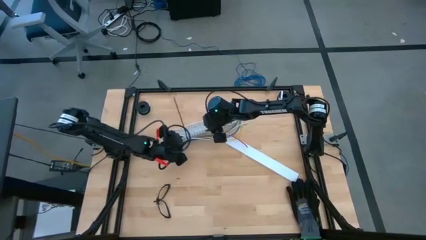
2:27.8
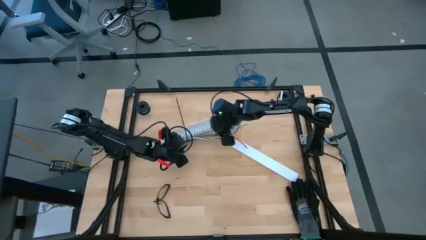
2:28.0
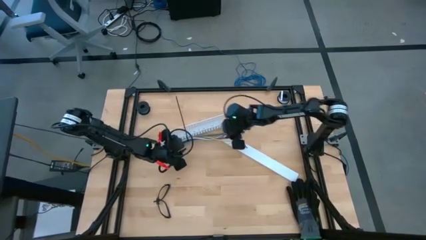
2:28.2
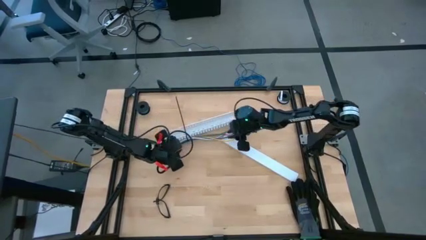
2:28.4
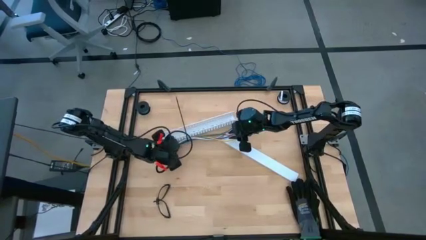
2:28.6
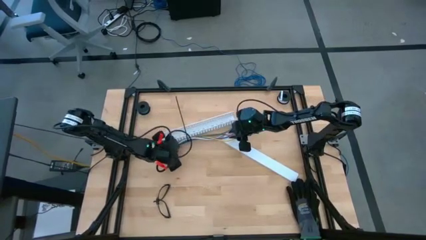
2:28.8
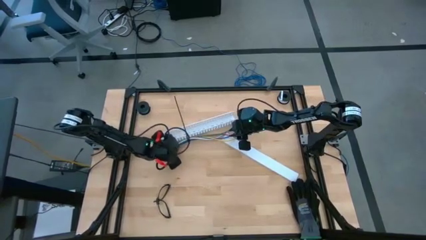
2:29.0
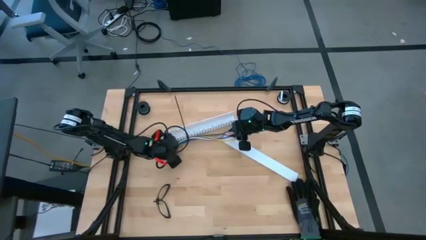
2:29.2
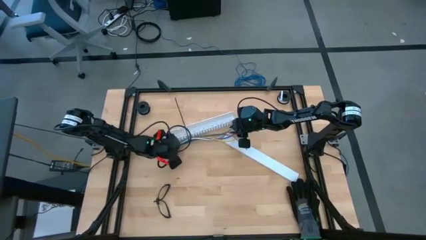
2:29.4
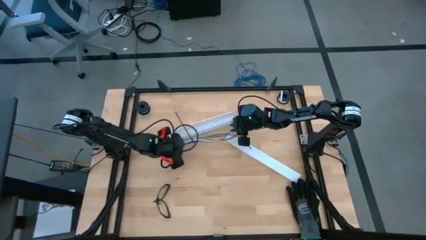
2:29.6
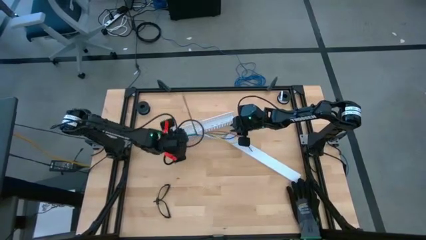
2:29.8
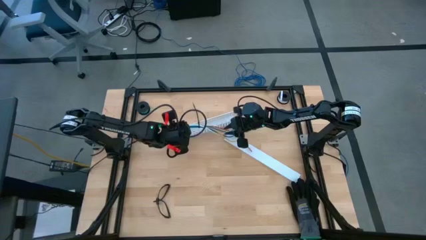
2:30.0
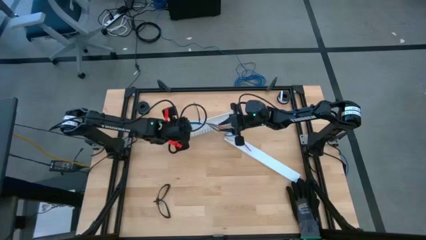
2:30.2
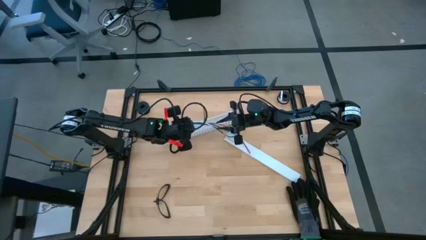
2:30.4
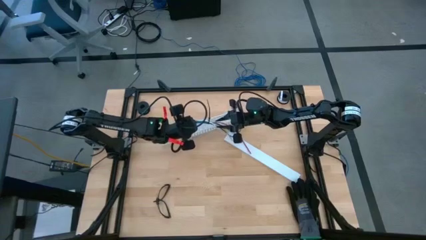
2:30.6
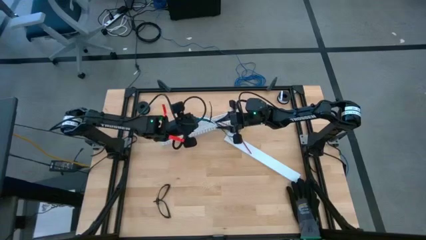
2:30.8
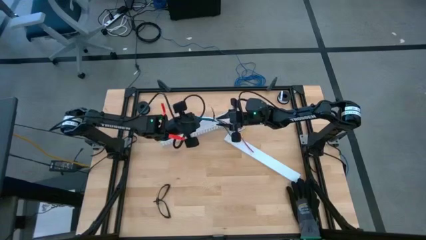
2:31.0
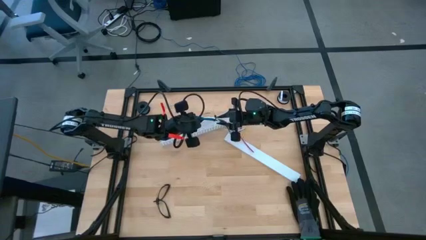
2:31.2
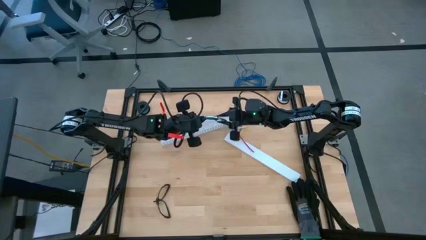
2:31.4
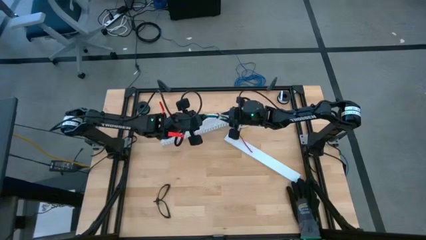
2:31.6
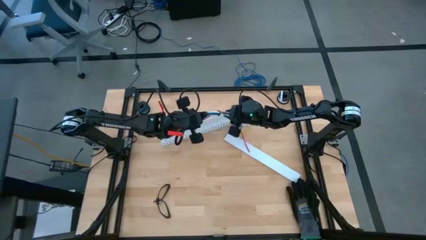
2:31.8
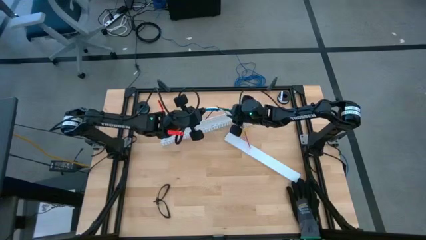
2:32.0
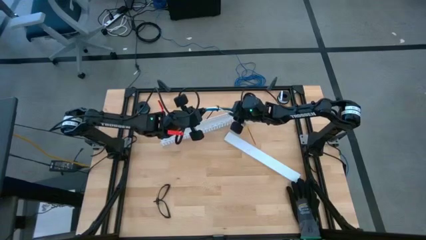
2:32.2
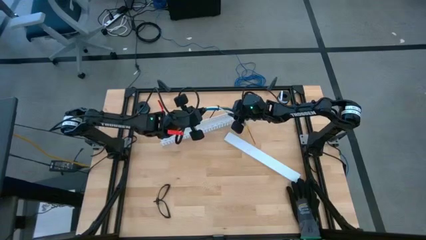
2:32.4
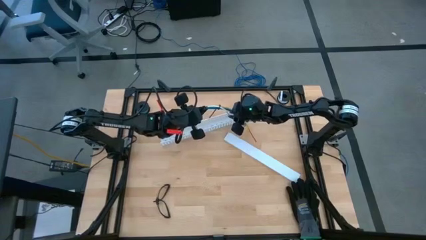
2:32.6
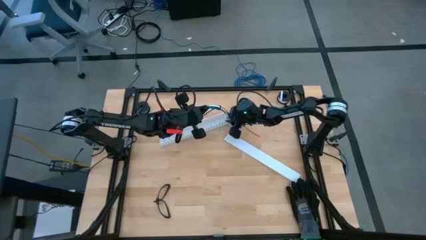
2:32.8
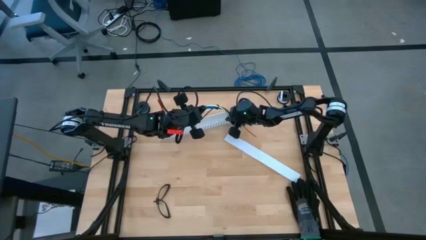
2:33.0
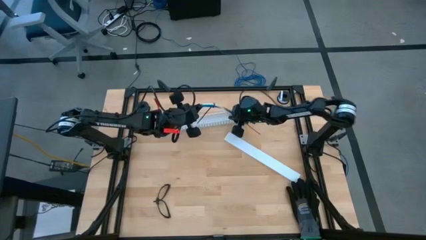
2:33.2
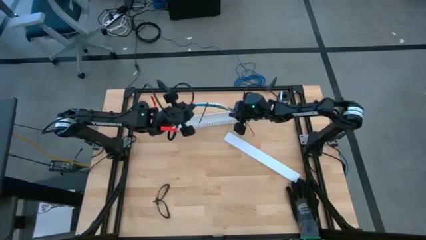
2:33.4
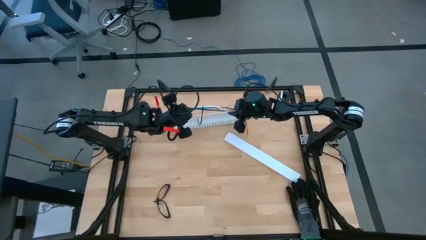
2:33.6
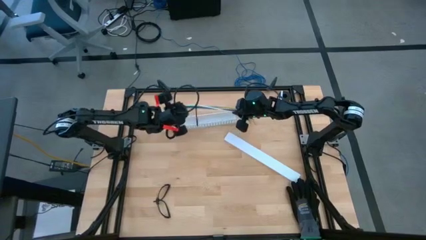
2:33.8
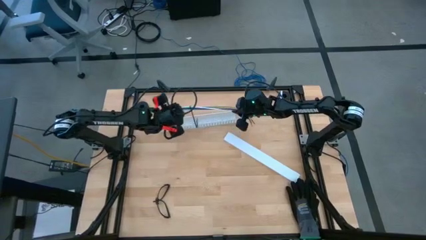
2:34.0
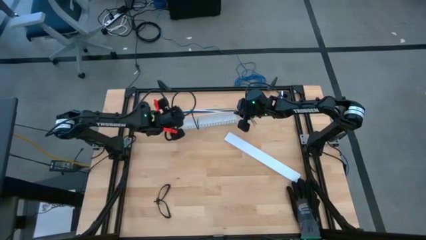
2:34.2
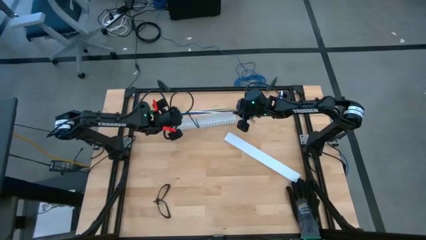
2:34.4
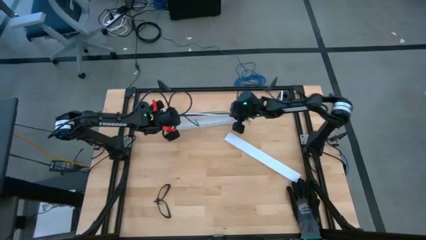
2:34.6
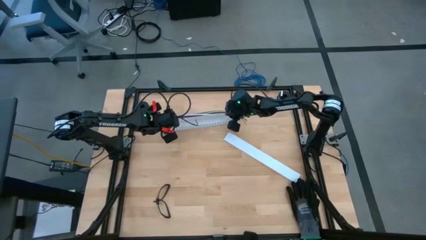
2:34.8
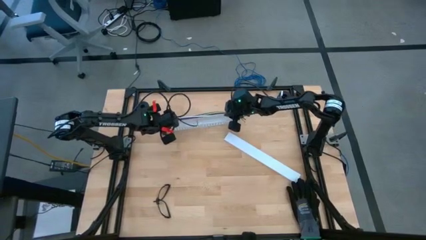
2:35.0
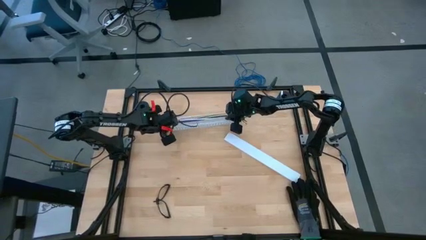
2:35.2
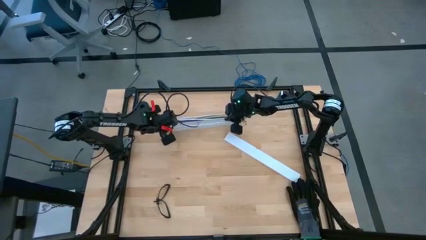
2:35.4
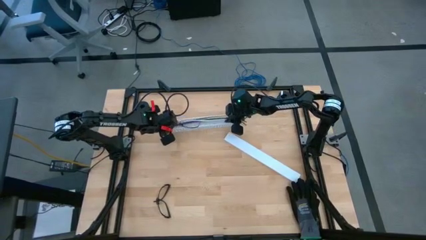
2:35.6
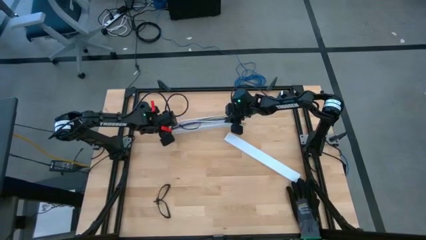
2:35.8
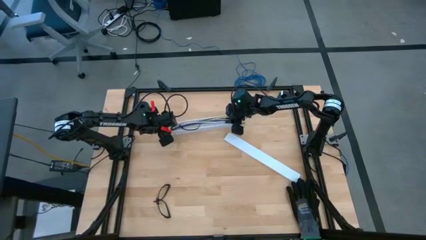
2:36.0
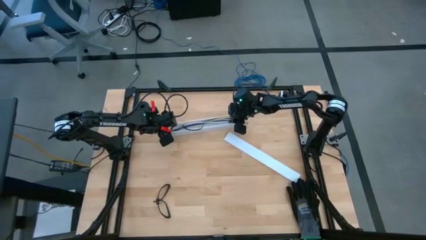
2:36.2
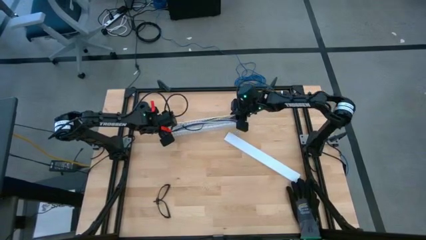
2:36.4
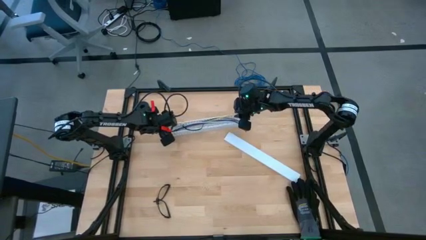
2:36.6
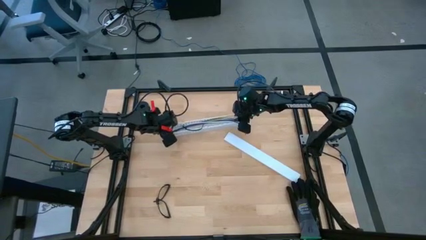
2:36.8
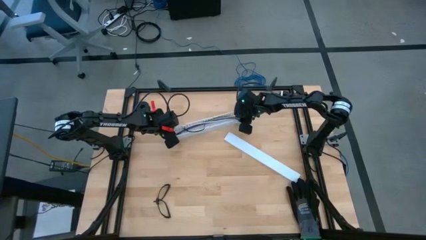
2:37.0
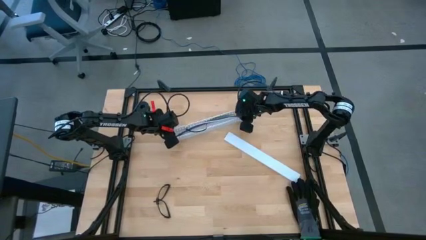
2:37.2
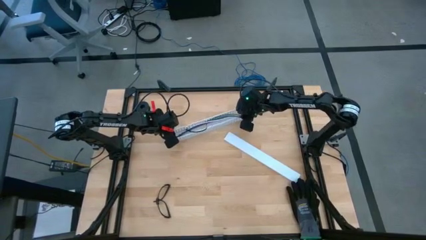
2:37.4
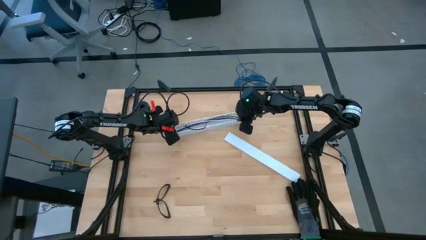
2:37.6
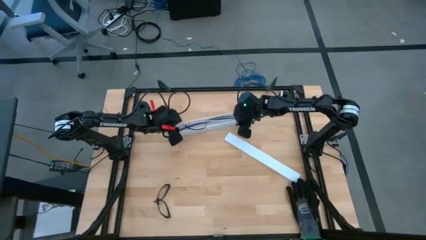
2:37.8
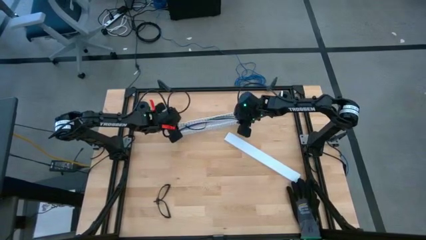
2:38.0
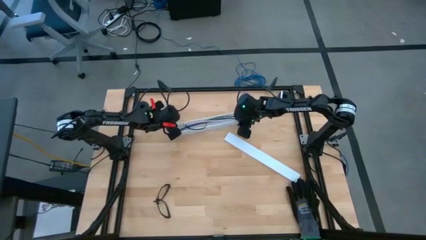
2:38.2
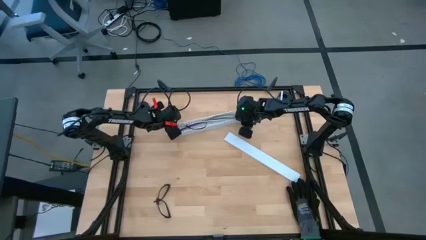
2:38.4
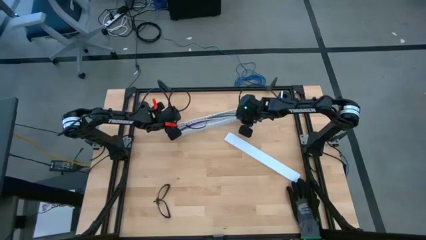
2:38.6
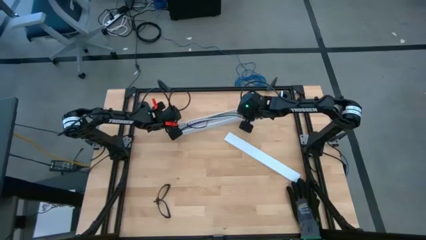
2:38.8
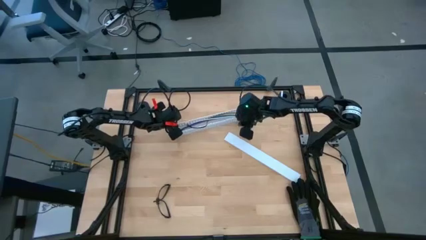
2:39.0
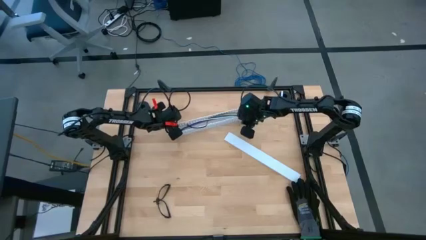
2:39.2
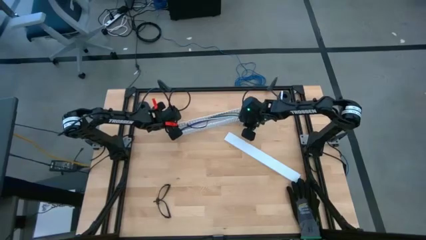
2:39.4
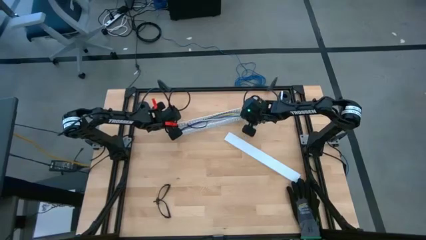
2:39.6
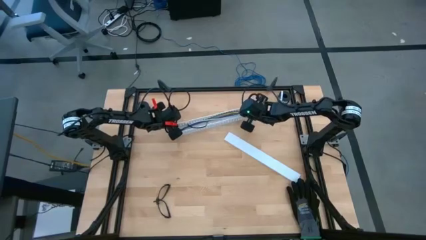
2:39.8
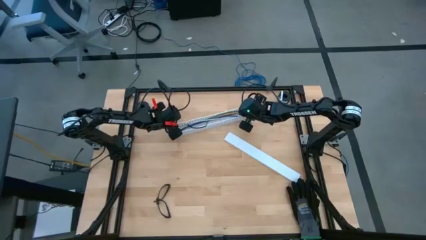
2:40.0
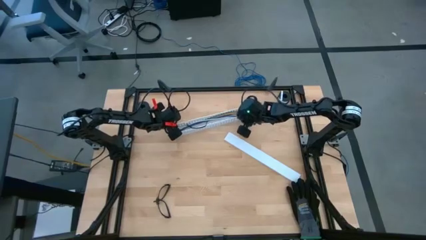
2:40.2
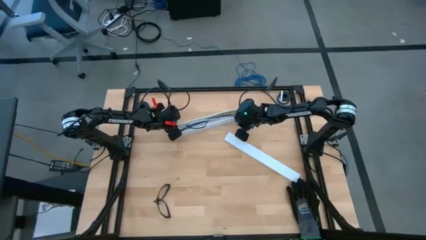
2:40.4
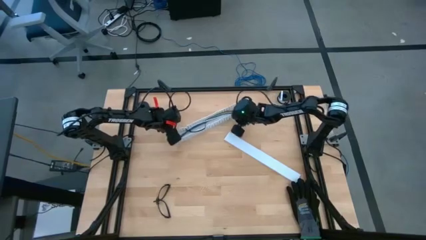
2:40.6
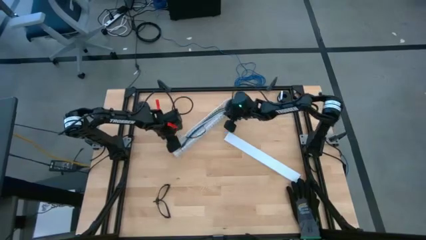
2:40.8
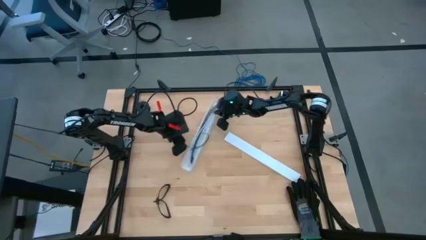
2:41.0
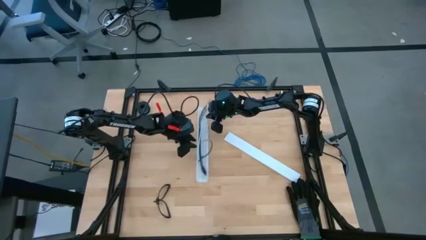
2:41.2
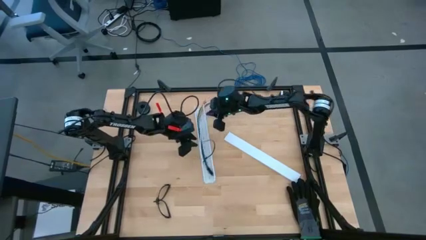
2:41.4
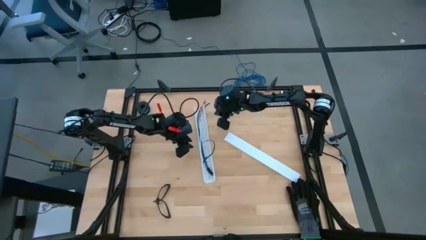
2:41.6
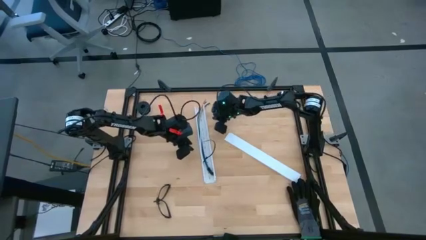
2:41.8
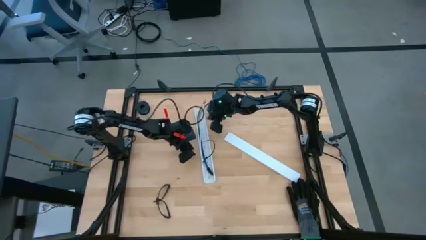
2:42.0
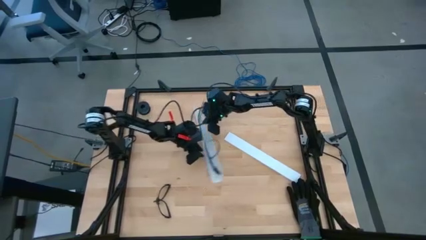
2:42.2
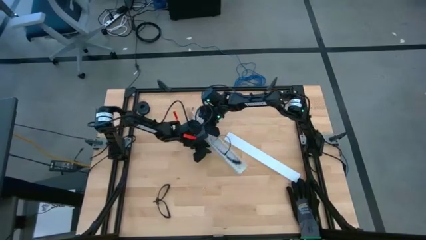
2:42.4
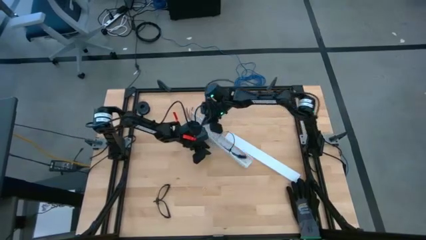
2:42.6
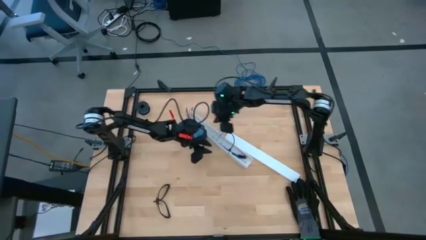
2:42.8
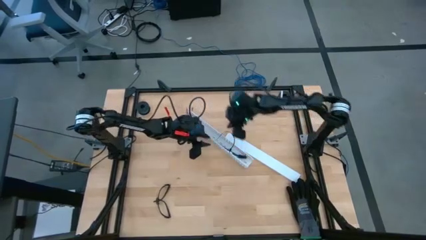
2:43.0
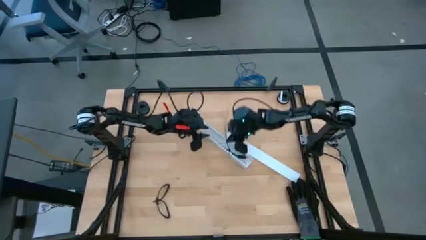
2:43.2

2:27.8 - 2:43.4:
Task: Ziptie cables
Put the zip-tied cables in the white cable duct
